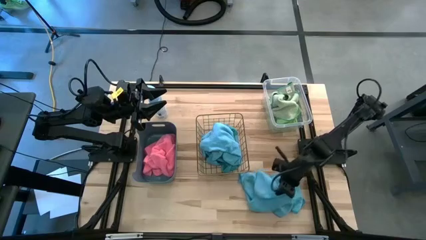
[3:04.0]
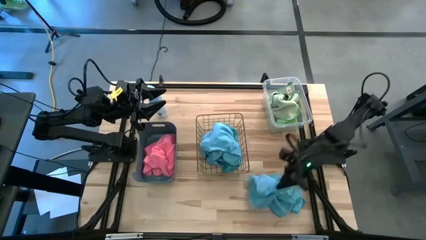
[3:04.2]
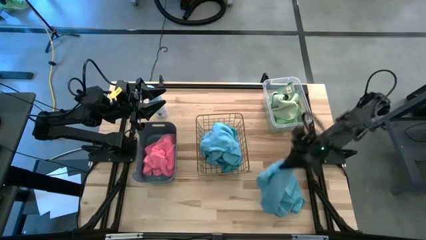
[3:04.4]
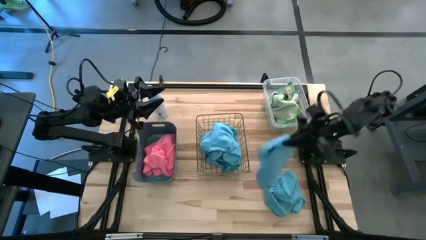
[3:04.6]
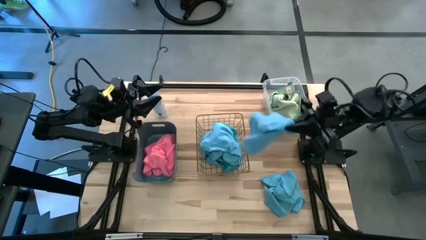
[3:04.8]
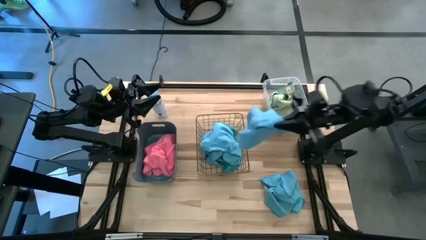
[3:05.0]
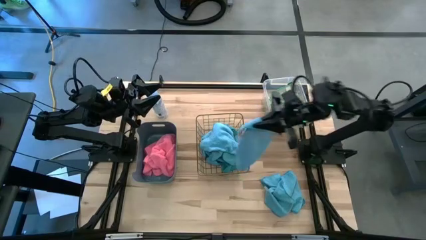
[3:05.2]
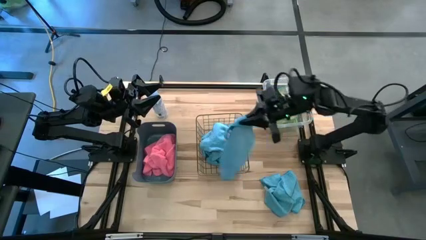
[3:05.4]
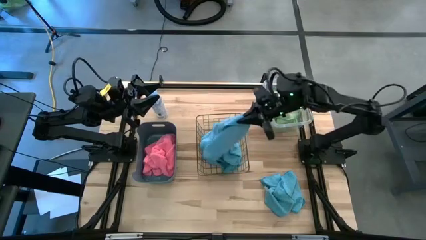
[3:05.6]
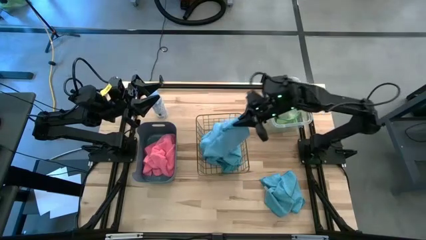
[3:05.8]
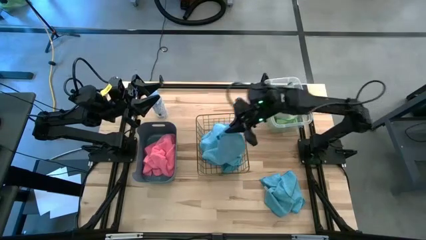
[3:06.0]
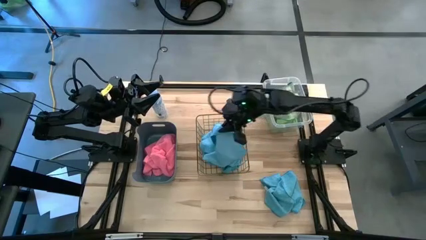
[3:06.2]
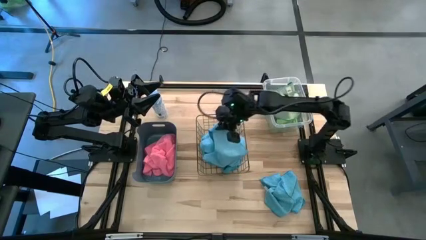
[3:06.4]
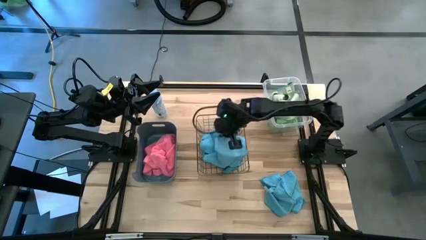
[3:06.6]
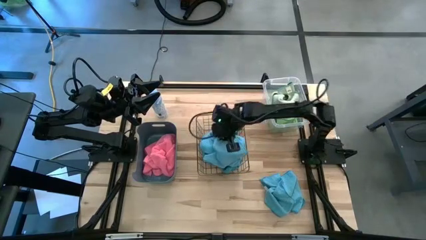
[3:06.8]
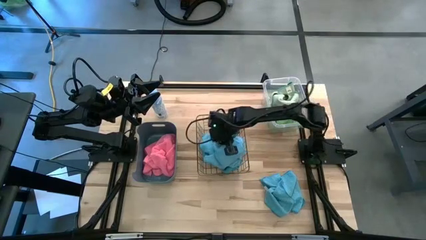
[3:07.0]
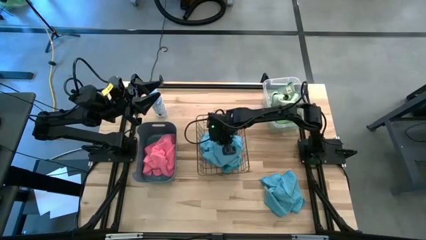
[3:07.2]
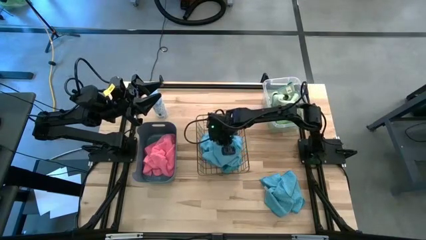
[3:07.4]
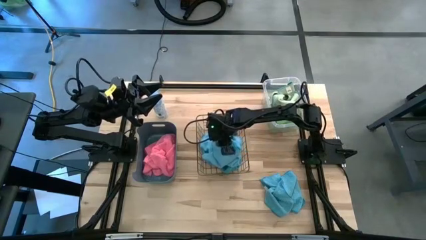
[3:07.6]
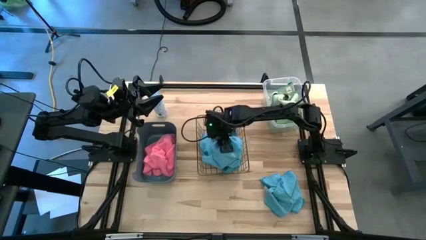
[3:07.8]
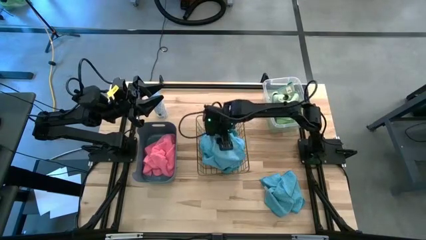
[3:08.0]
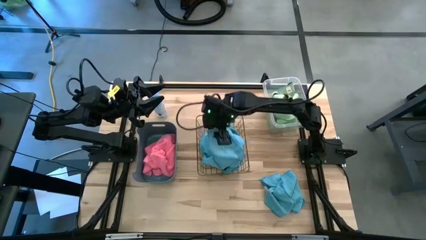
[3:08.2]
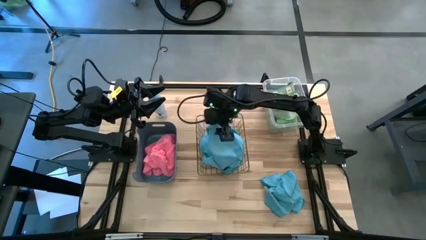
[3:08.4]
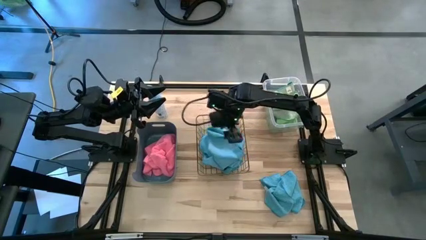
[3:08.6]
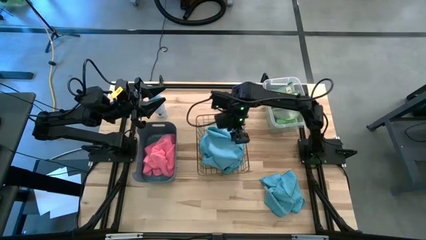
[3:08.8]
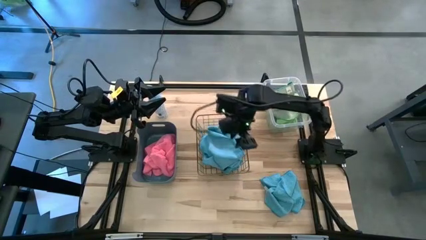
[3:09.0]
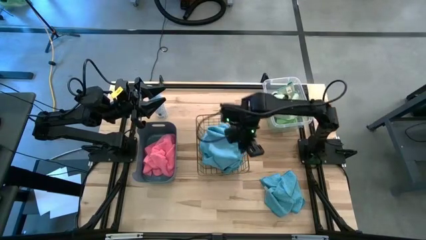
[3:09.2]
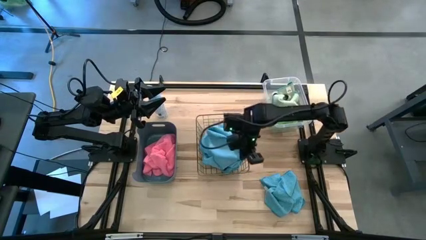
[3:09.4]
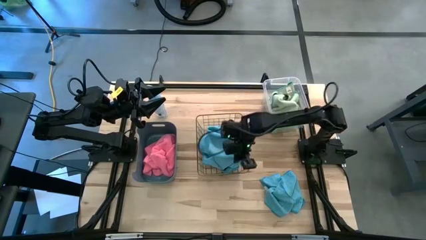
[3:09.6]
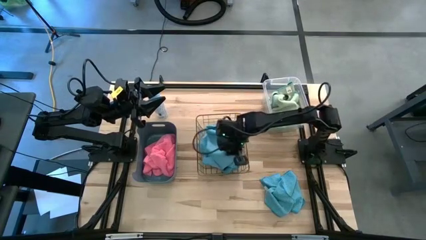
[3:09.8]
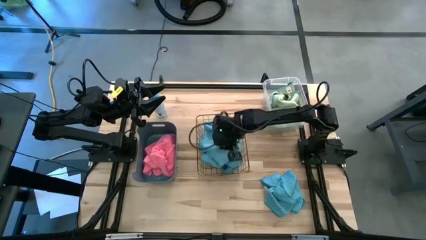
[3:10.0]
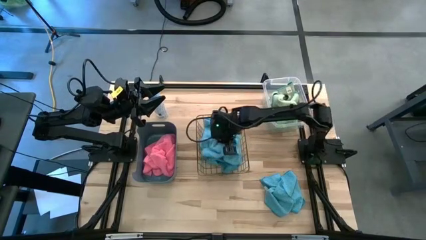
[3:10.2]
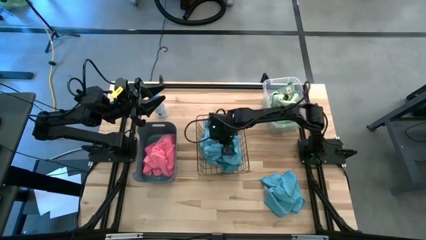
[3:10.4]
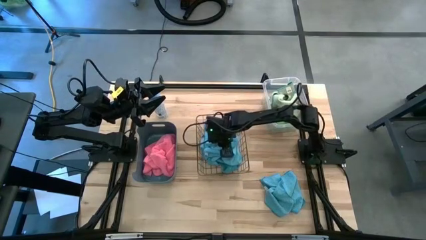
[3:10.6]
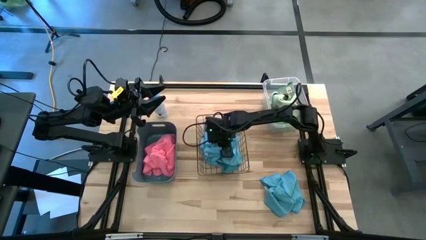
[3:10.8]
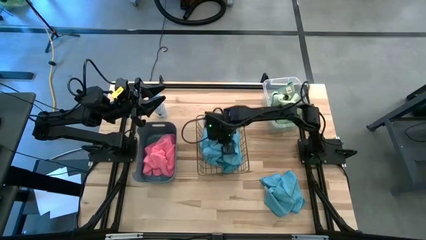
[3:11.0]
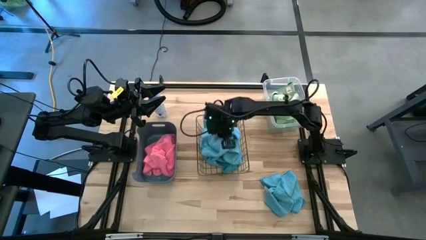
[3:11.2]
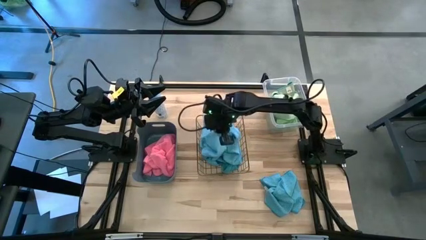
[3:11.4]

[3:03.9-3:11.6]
Task: Sort microfiber towel by color & place in baskets
Put the blue towel into the wire basket

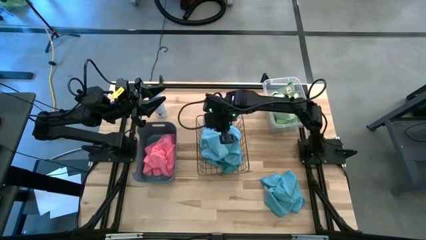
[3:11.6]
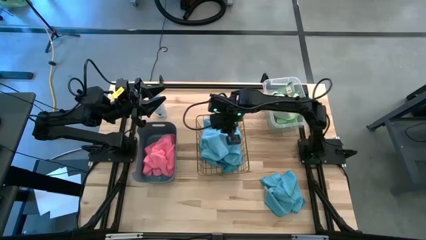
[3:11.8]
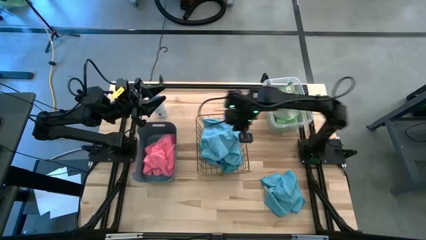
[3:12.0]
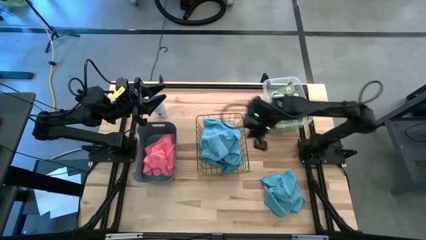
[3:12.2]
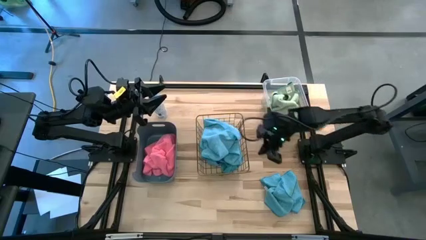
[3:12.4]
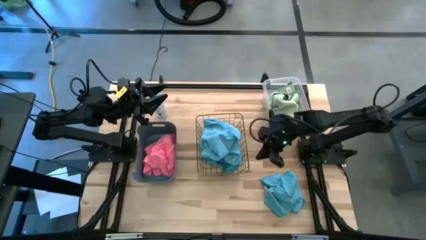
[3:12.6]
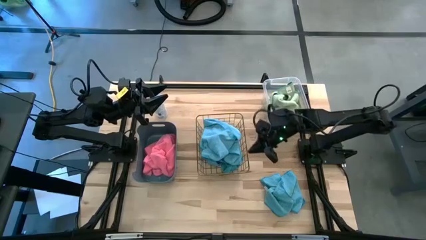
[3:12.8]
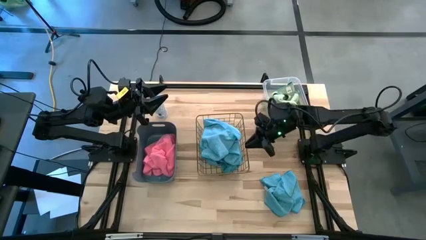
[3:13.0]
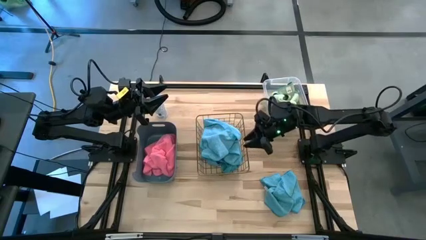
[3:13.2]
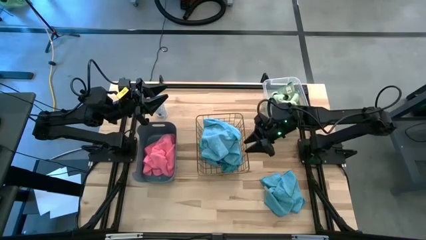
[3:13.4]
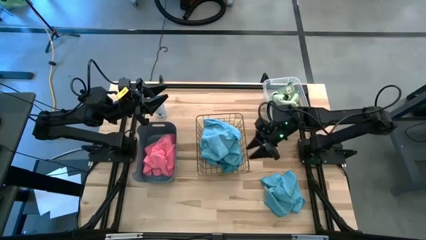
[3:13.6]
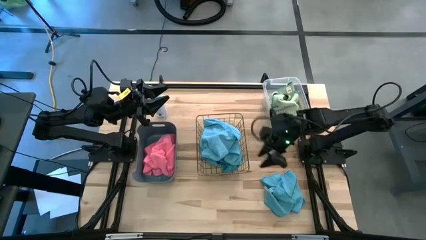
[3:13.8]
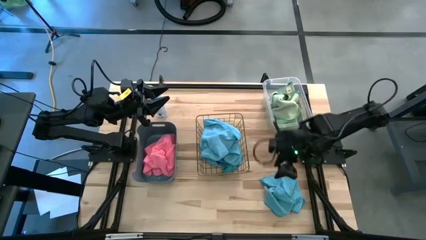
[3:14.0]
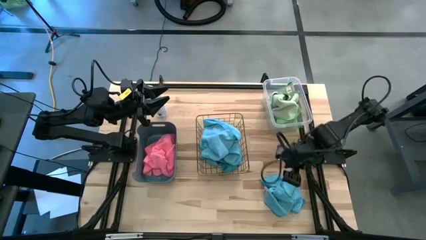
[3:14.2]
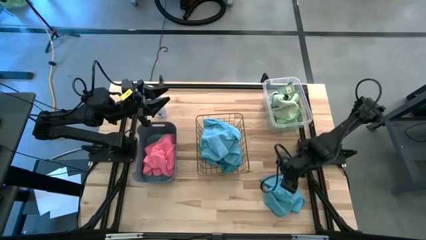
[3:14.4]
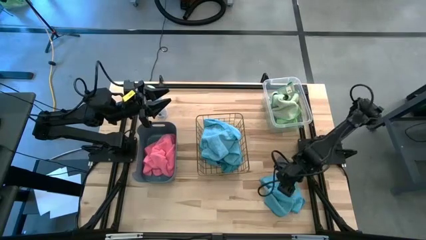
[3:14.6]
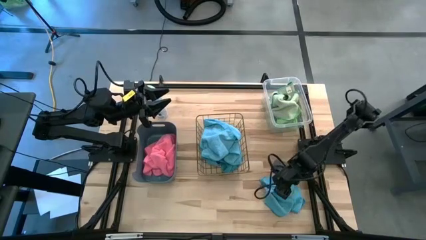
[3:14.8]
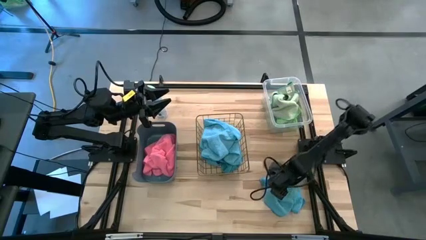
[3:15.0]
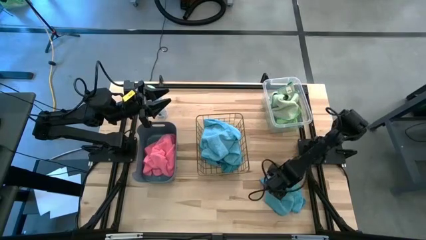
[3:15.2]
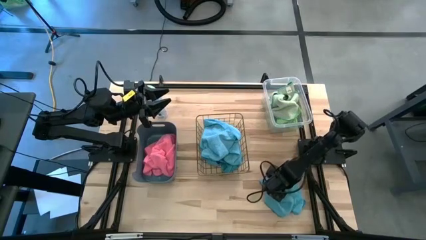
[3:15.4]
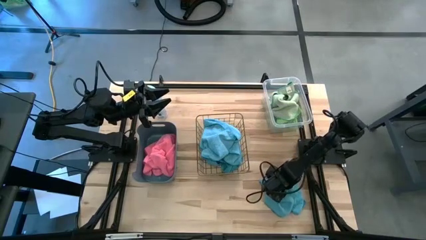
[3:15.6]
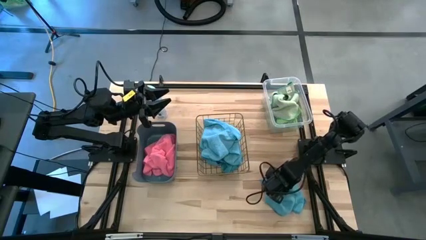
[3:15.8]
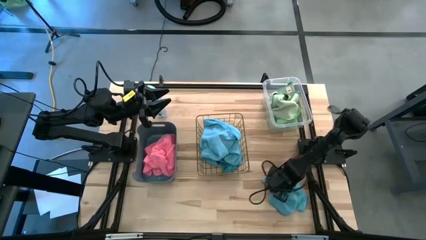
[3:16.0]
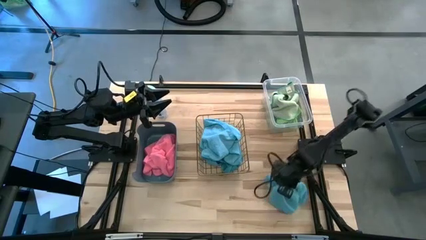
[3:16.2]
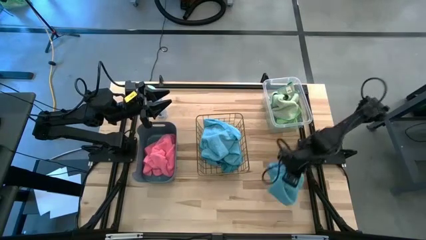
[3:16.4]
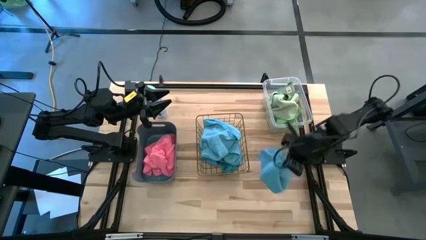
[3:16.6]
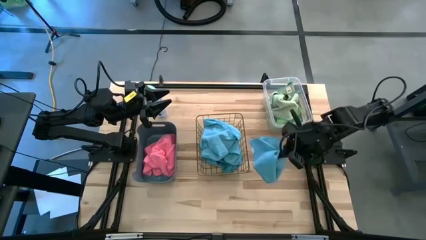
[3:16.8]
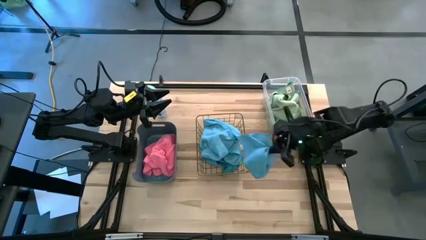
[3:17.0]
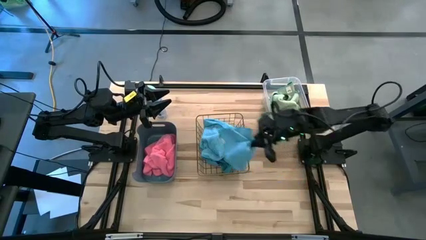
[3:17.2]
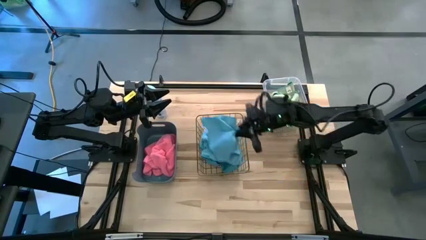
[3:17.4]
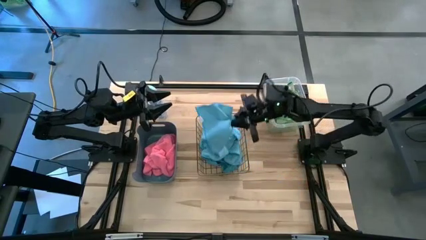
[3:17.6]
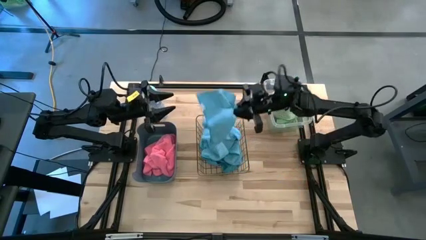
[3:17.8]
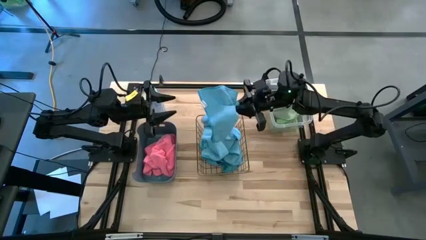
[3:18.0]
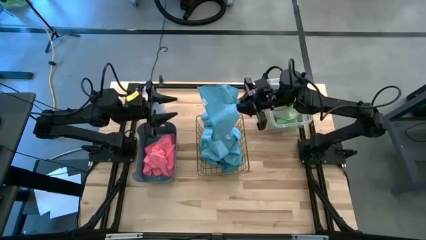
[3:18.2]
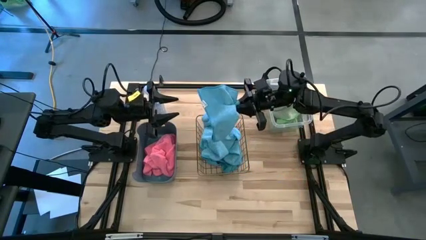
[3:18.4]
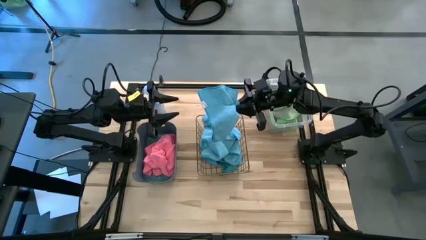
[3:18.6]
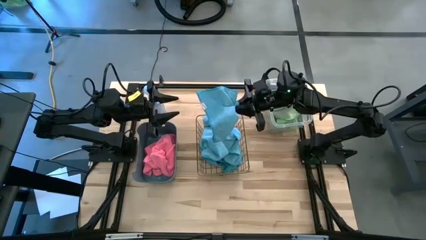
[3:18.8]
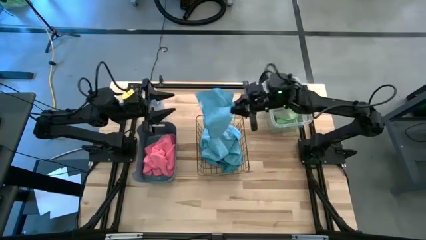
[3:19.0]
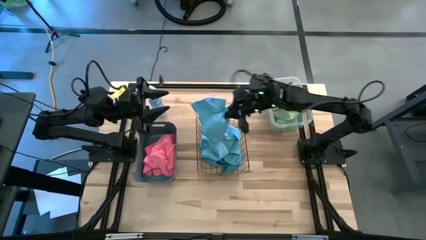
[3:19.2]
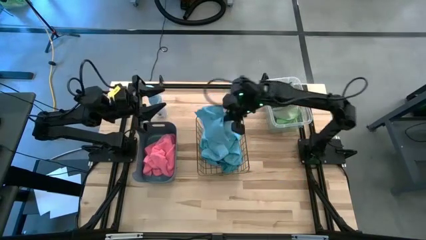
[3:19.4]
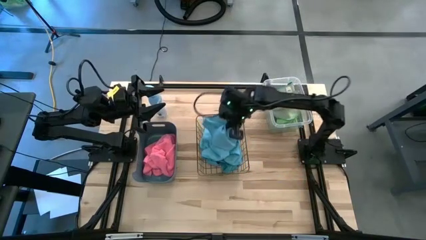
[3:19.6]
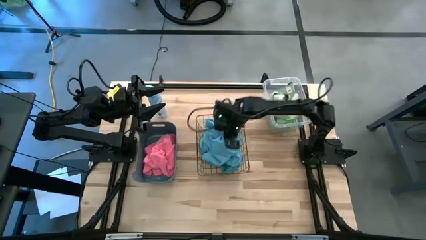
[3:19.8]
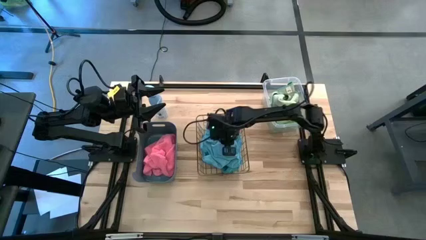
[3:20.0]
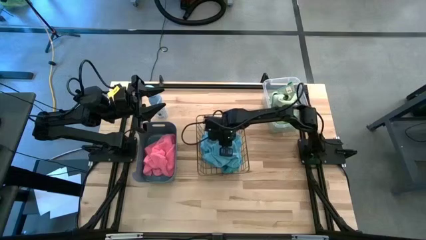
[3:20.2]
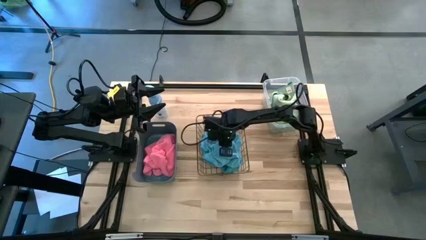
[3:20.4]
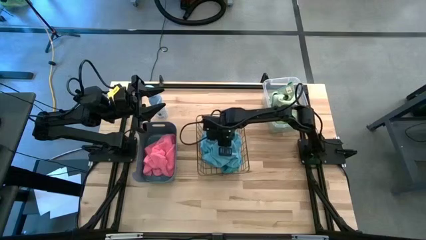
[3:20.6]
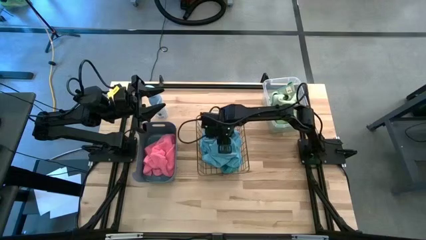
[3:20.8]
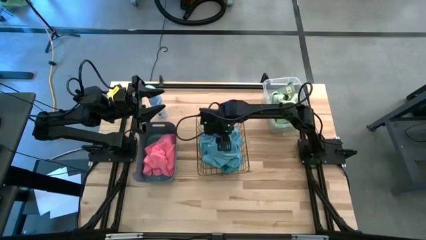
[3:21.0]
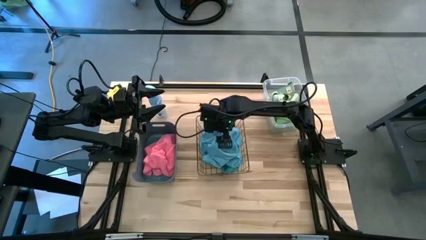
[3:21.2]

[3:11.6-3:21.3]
Put the blue towel into the wire basket
